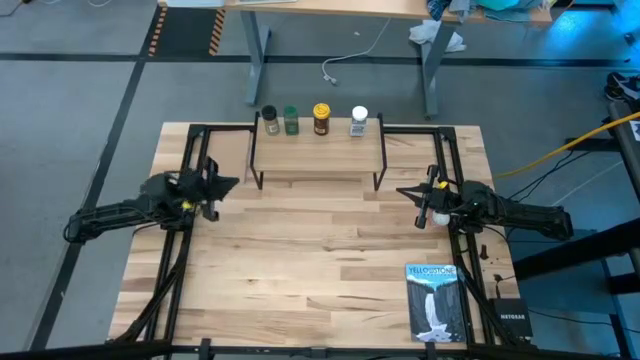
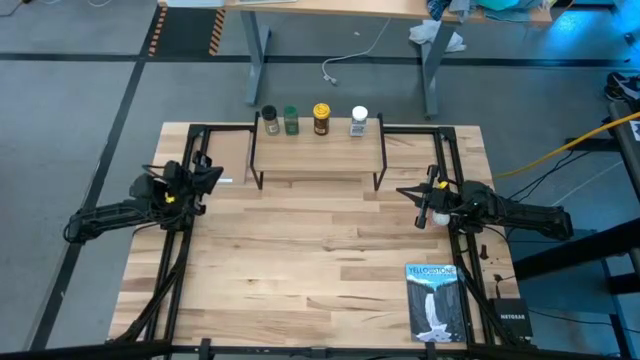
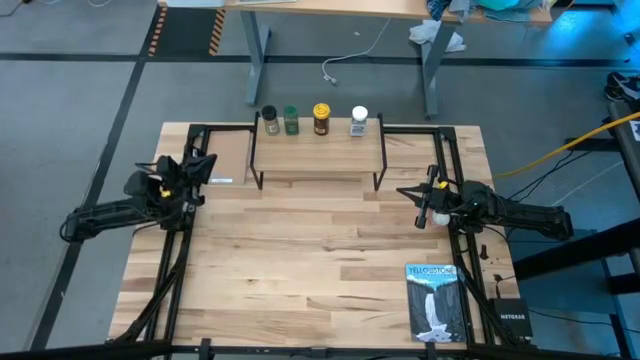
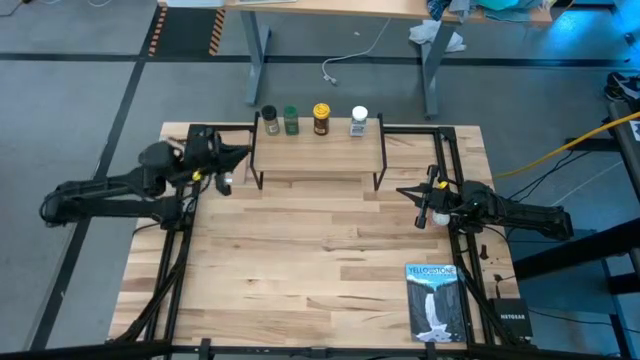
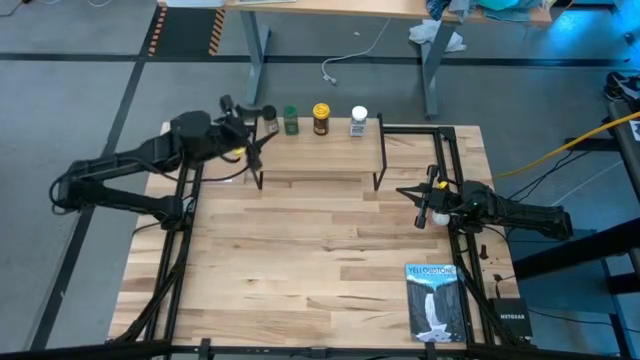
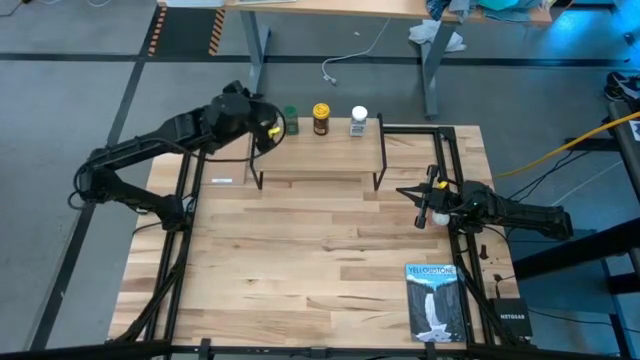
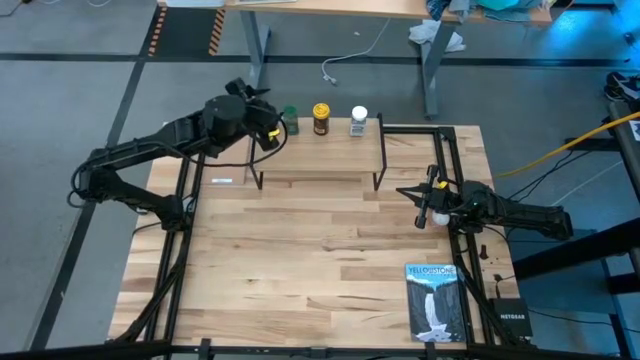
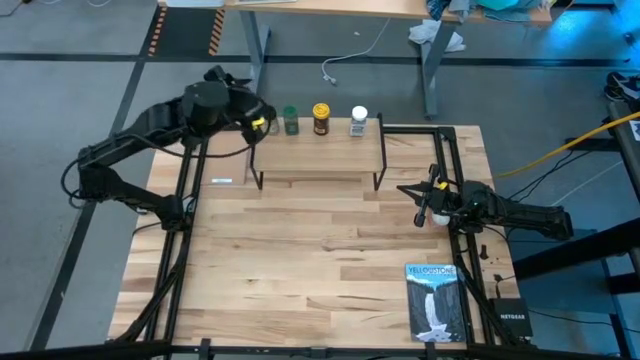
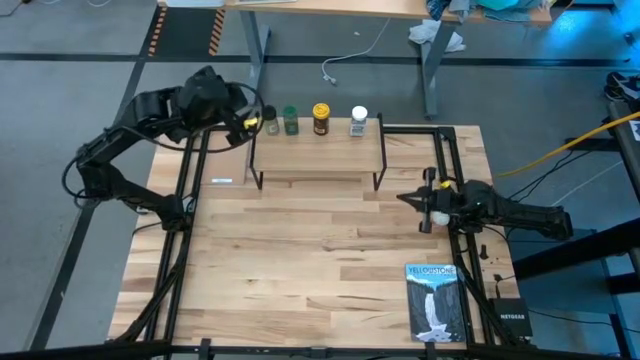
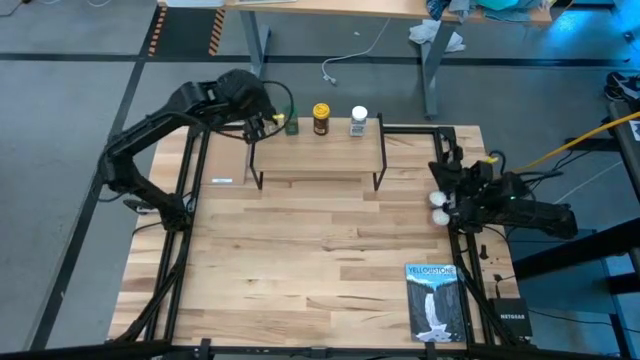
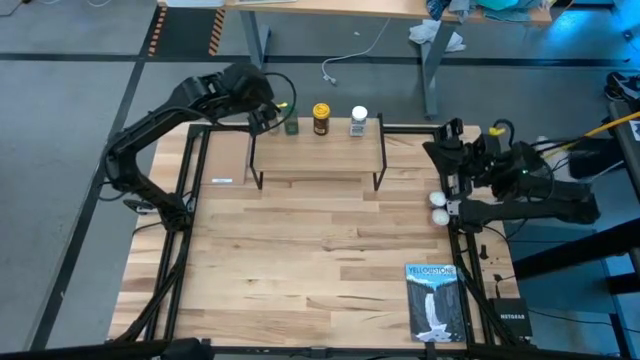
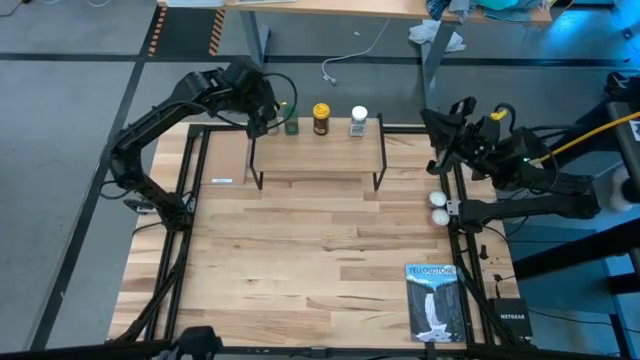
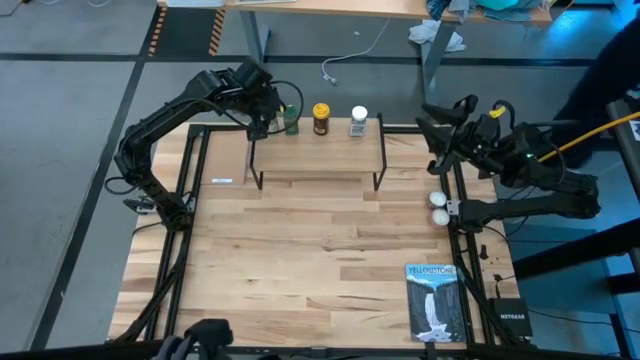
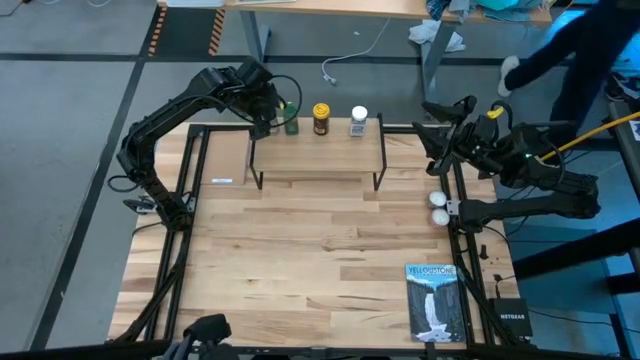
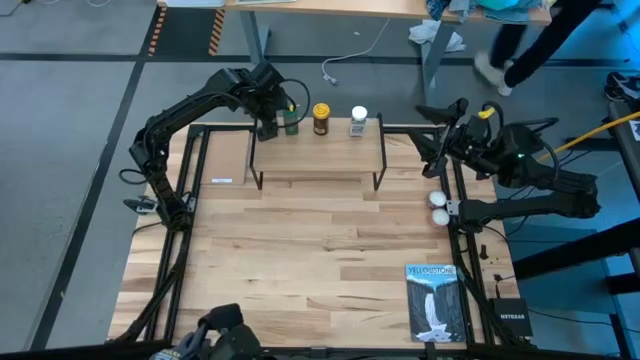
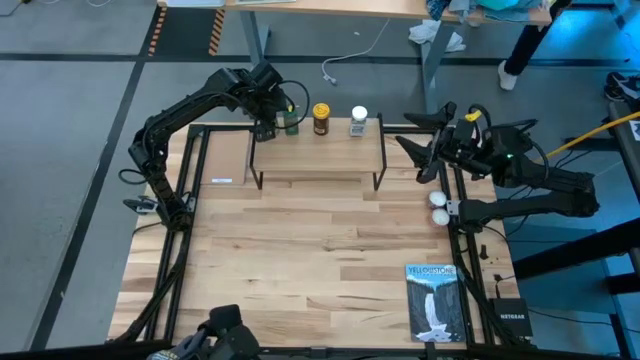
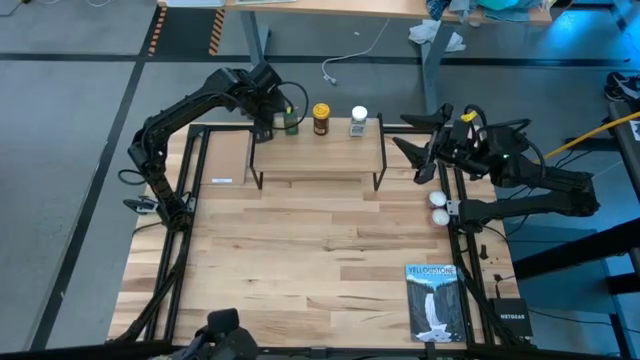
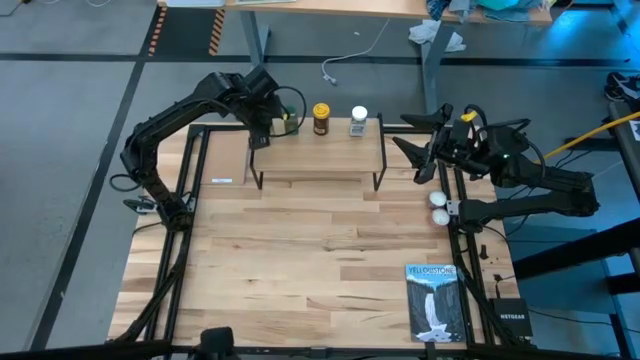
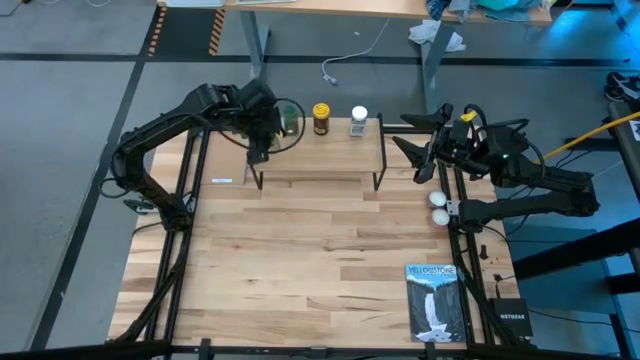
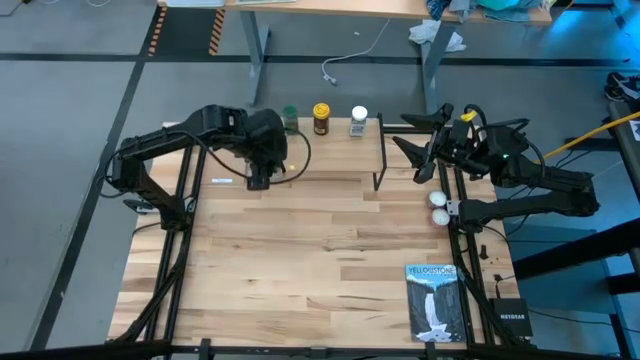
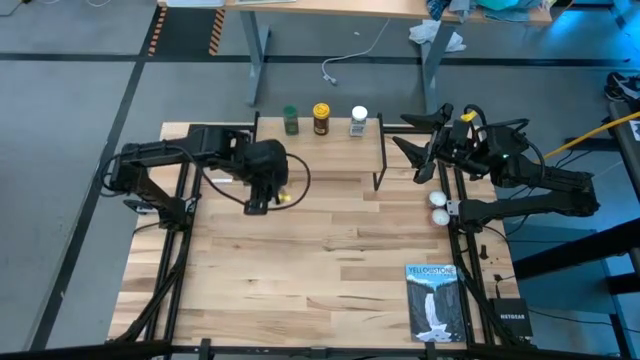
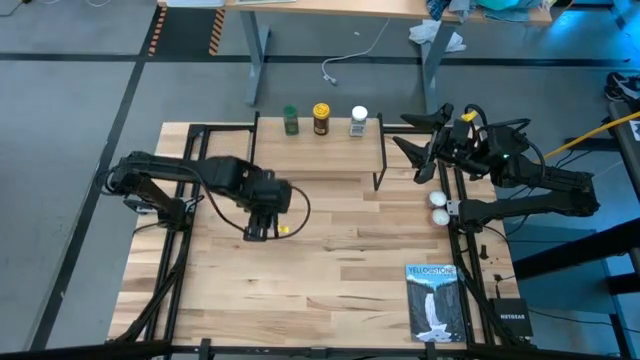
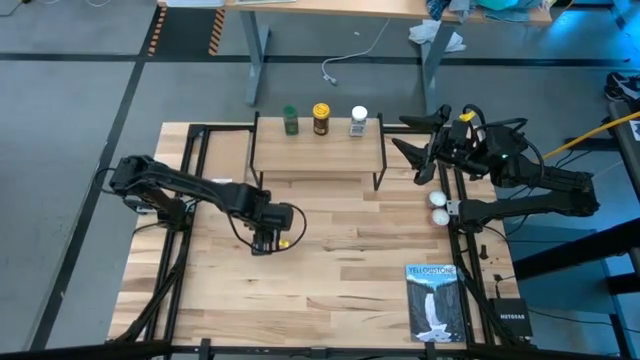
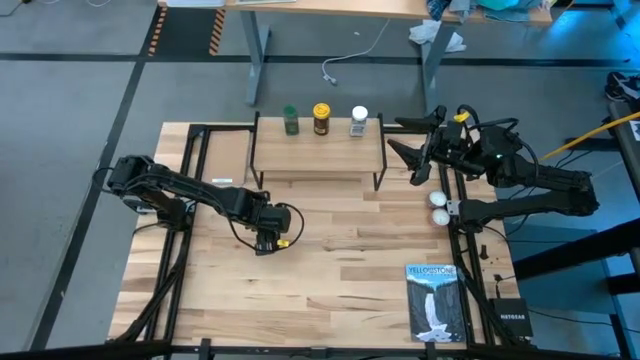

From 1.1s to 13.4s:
Task: Shelf spices
Remove the black seasoning bottle from the shelf

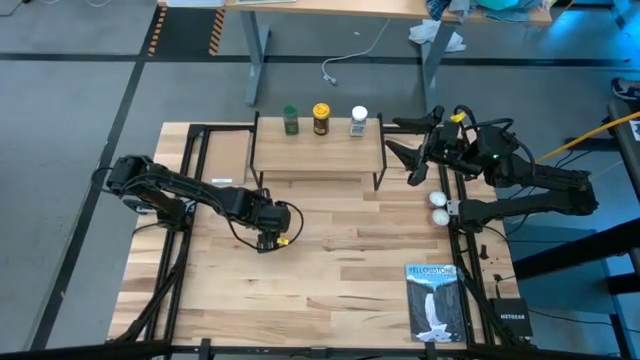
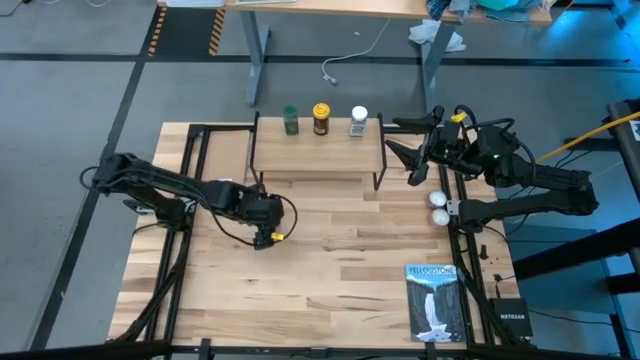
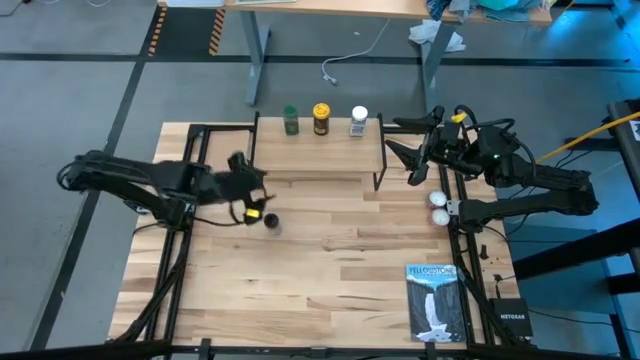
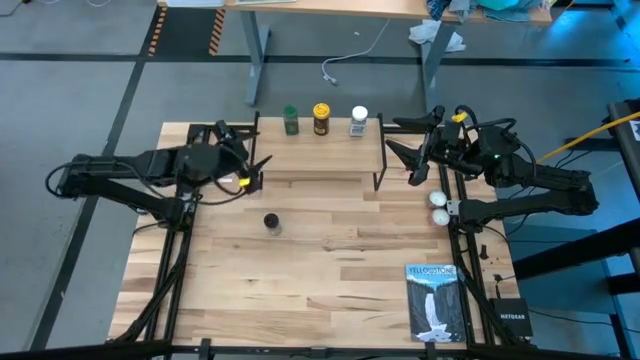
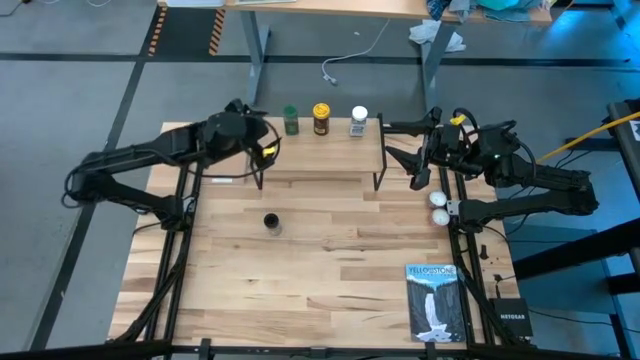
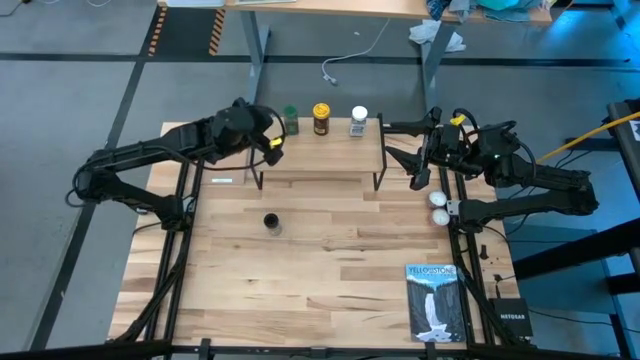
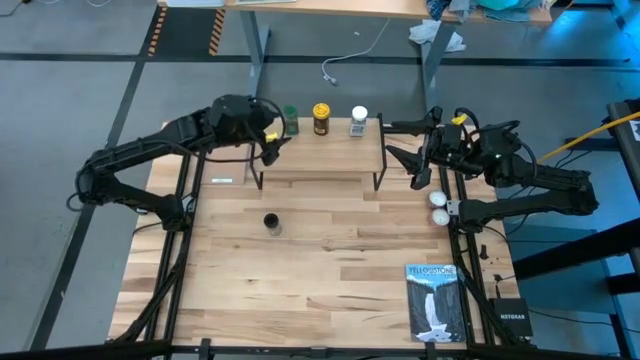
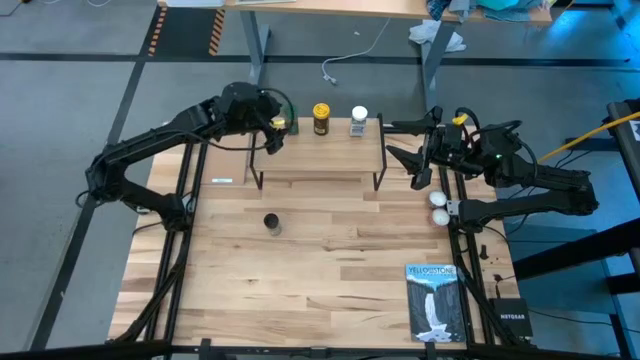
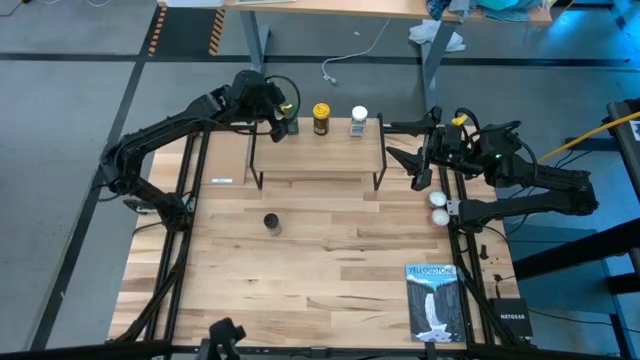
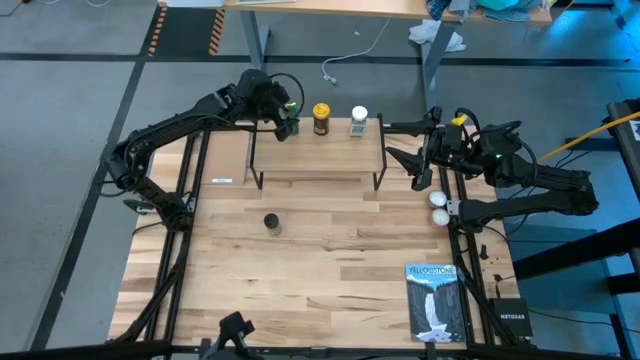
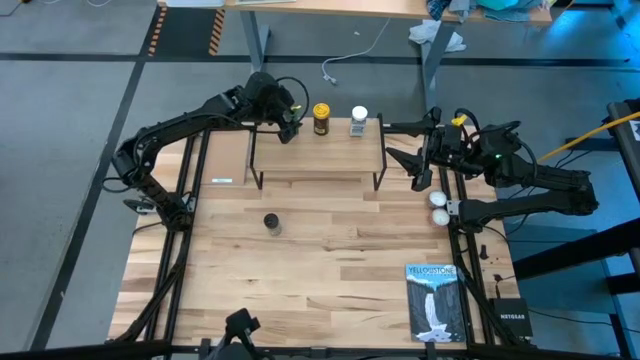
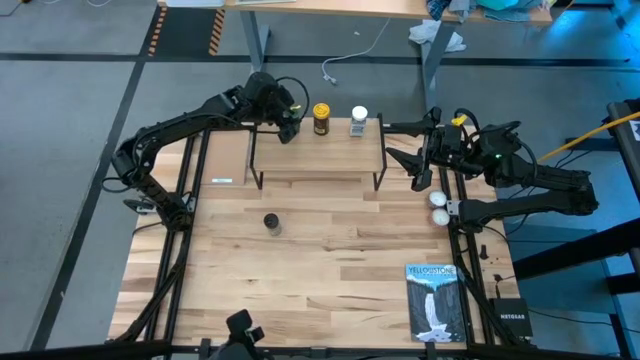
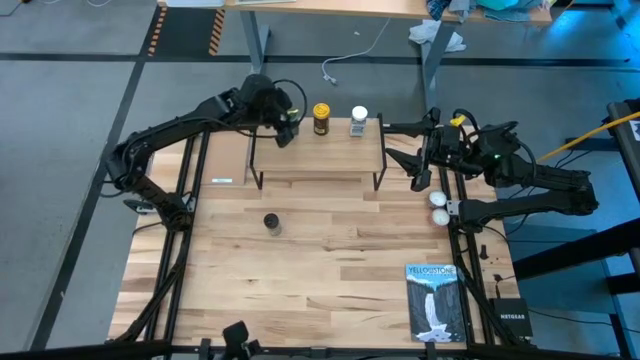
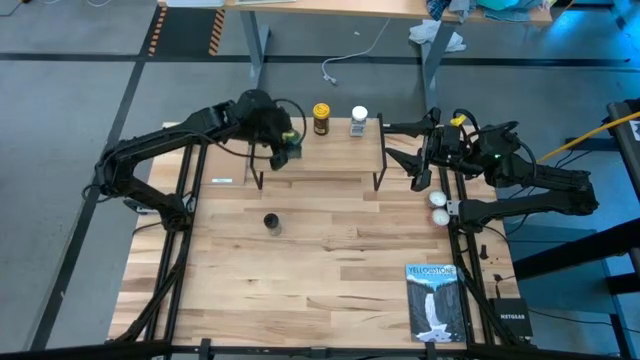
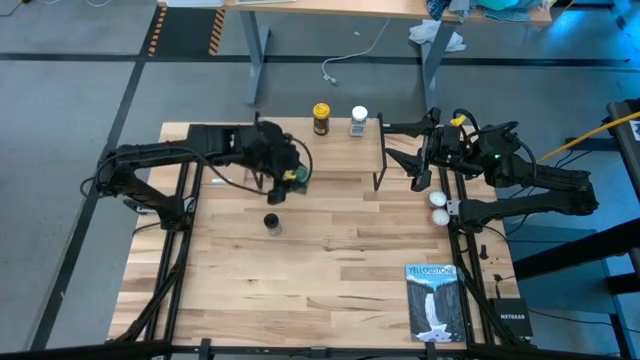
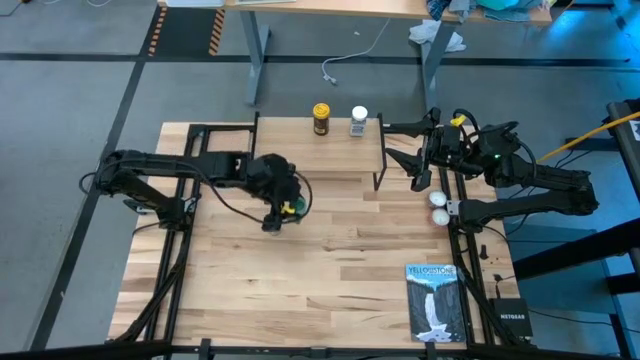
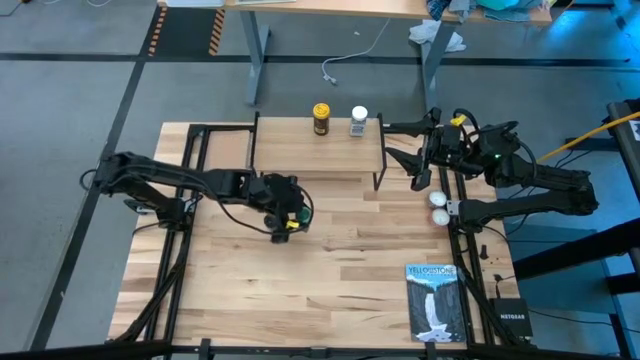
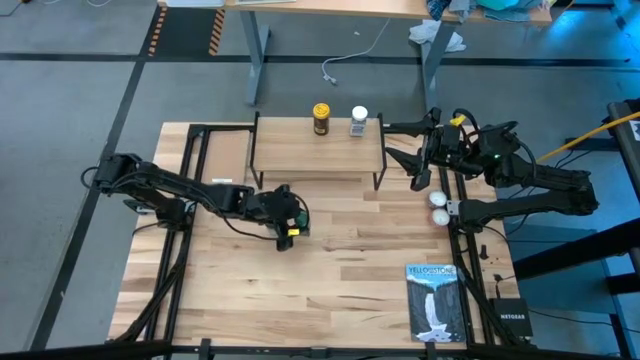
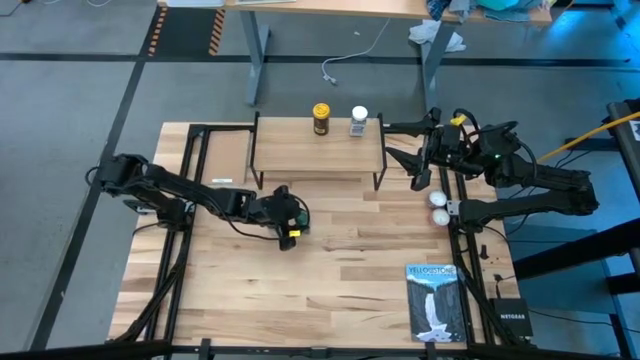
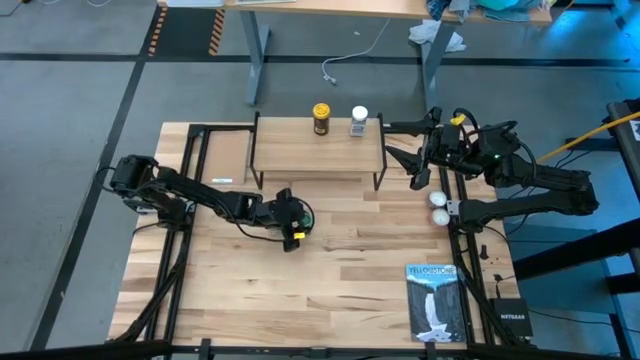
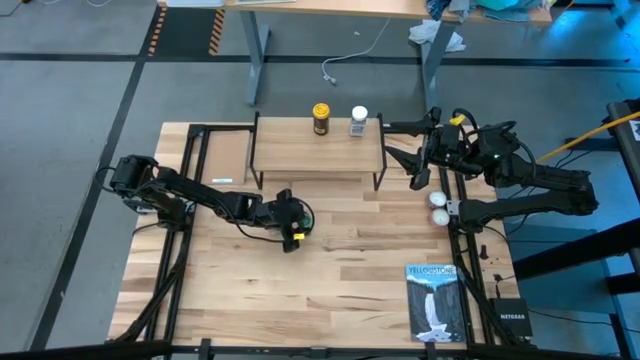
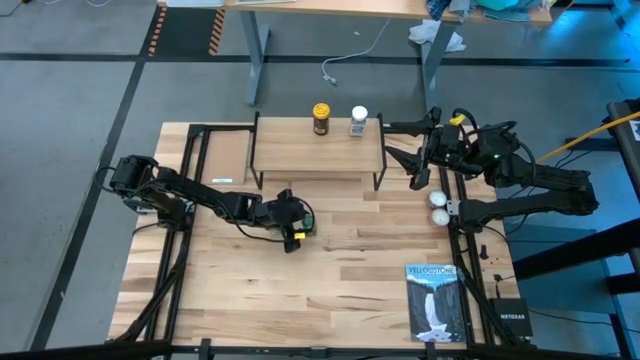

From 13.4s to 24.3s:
Remove the green seasoning bottle from the shelf
